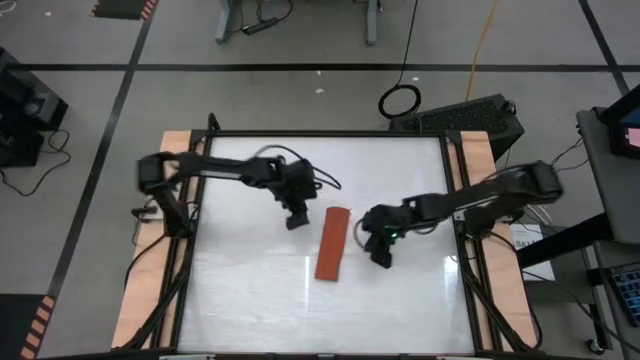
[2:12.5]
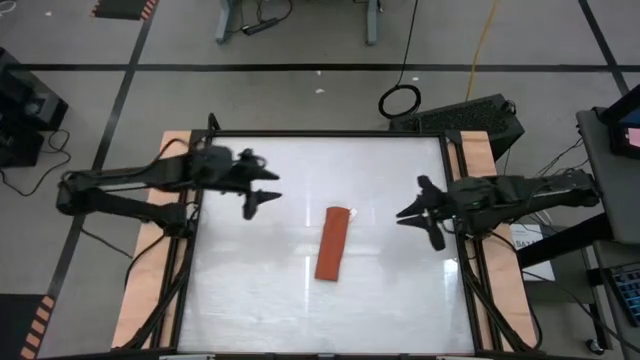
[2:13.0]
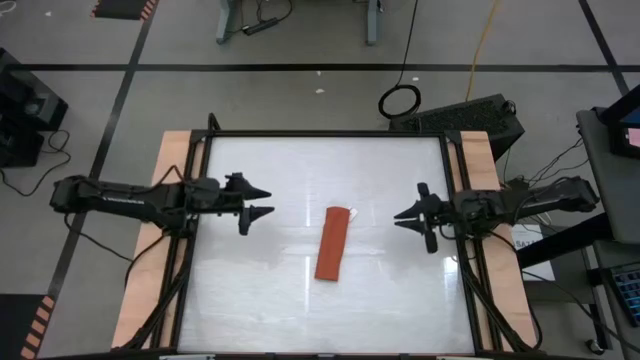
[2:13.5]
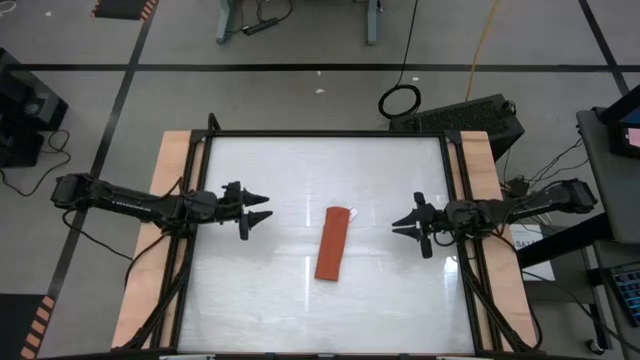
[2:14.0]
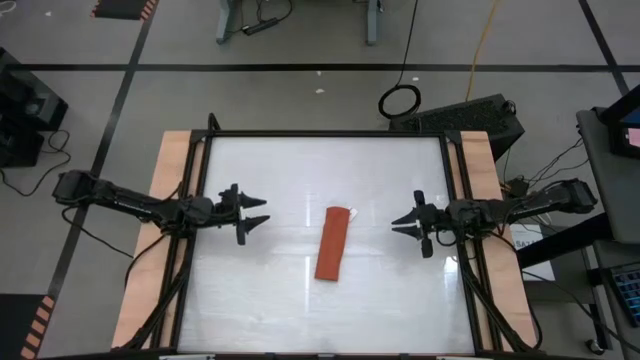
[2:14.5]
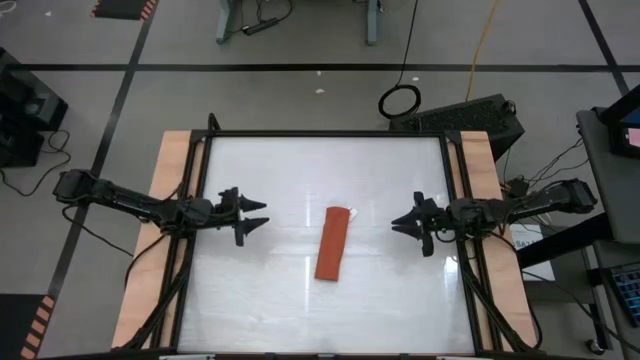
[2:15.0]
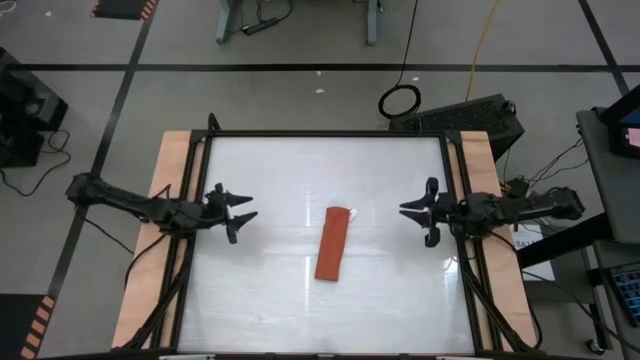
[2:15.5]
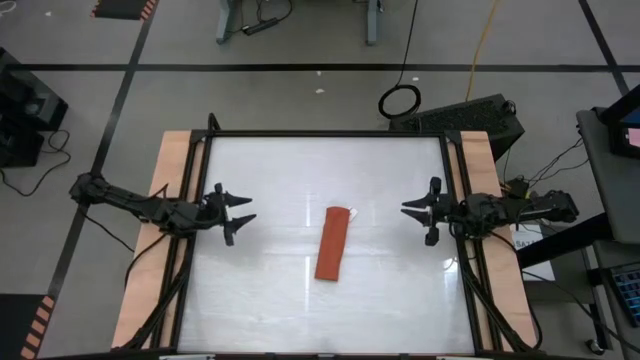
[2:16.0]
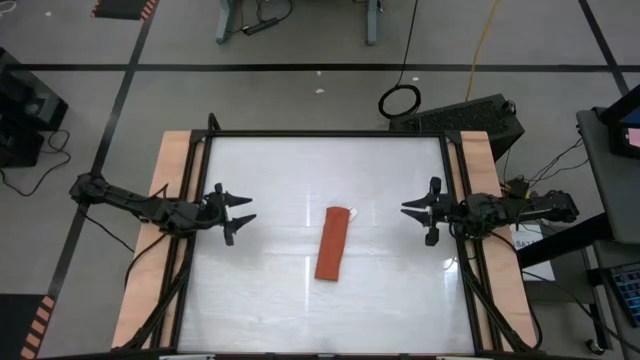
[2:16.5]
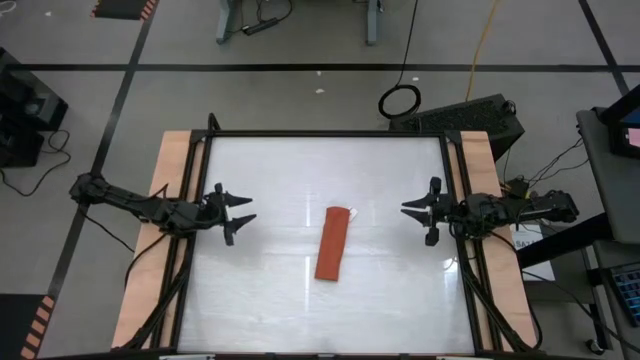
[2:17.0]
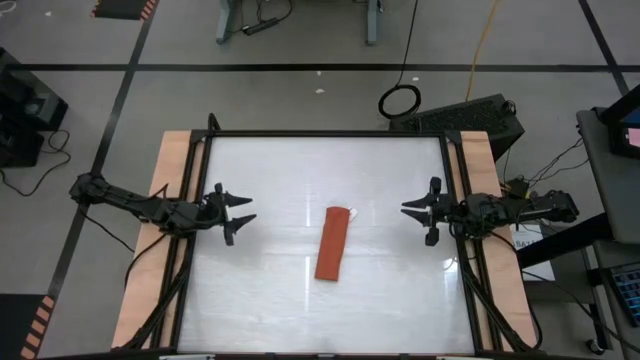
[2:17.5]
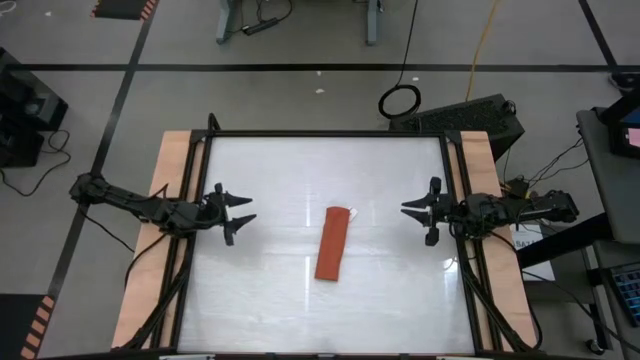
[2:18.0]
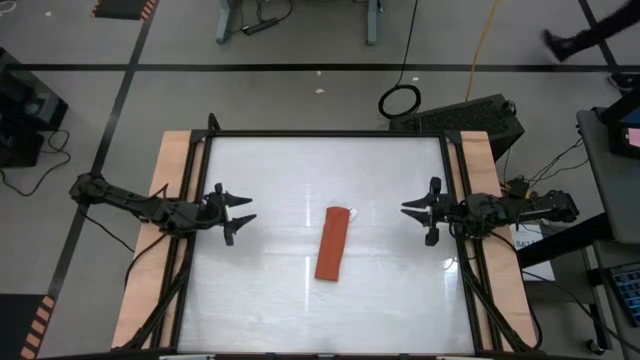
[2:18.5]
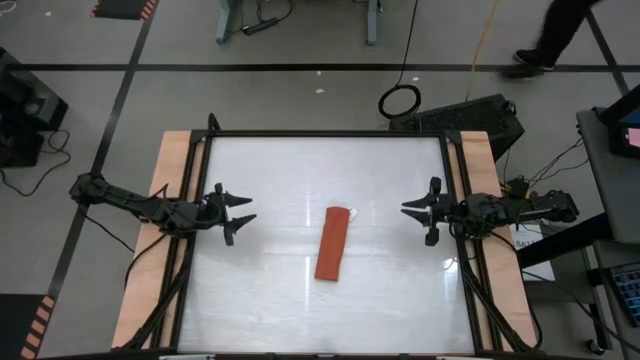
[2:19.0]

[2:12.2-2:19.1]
Task: Roll towel
Return to Home Position

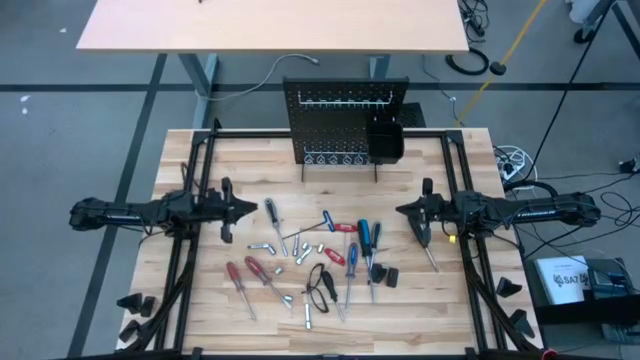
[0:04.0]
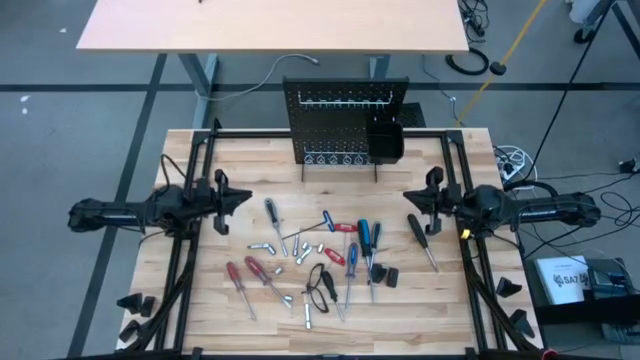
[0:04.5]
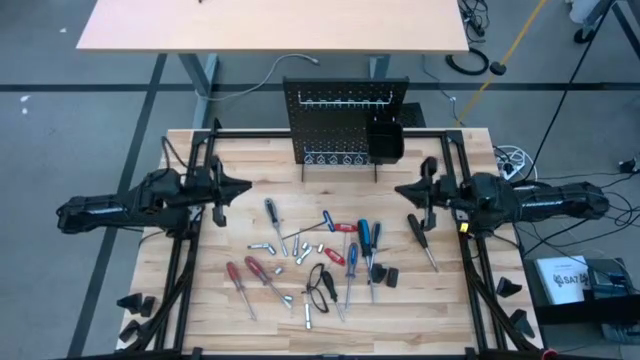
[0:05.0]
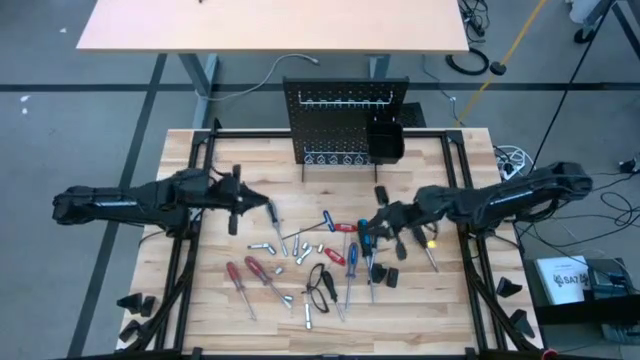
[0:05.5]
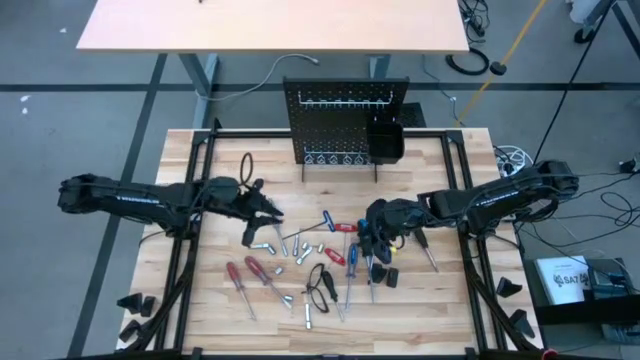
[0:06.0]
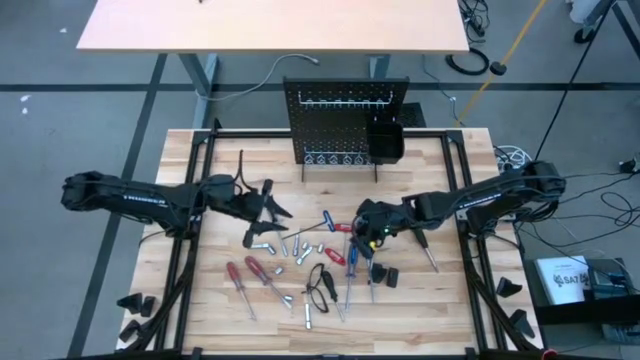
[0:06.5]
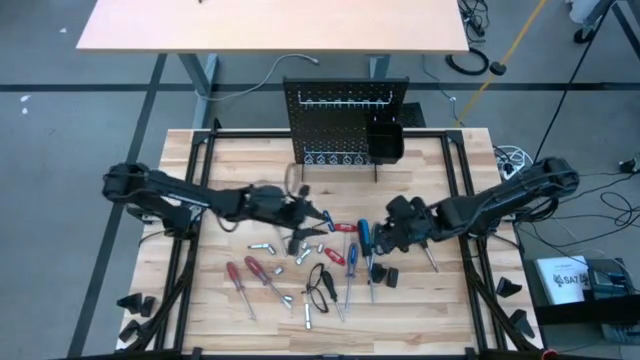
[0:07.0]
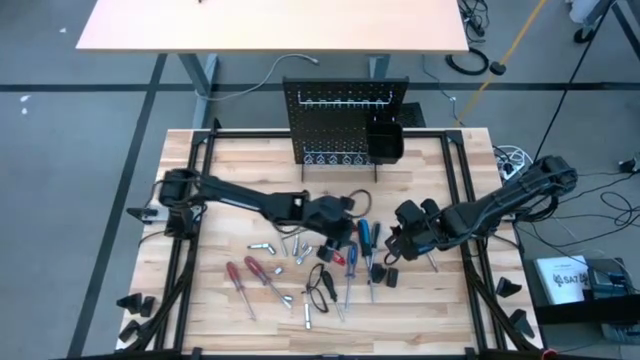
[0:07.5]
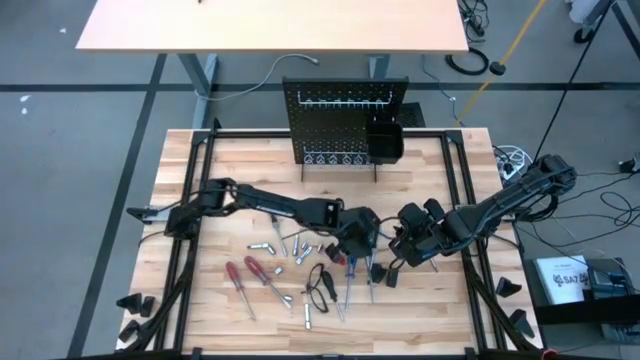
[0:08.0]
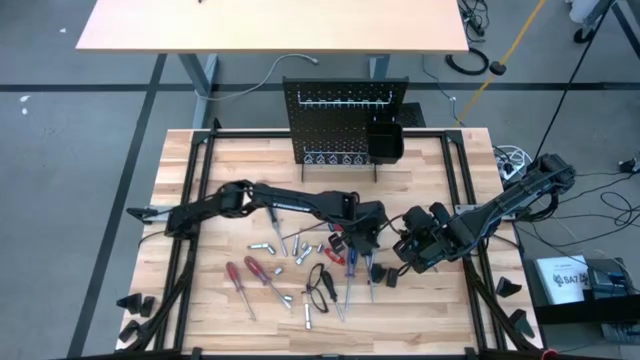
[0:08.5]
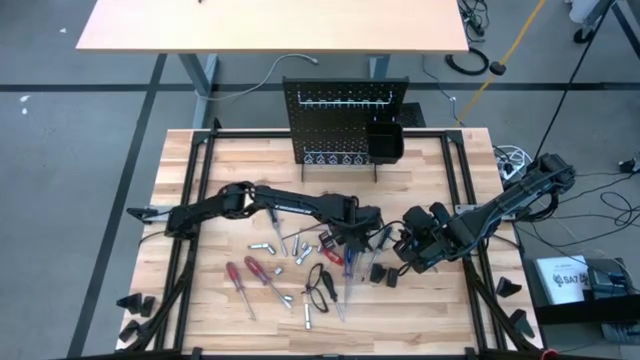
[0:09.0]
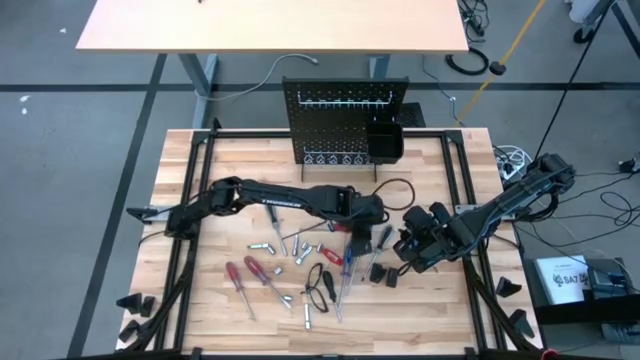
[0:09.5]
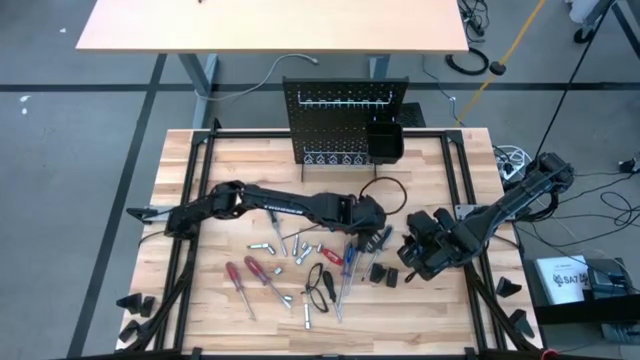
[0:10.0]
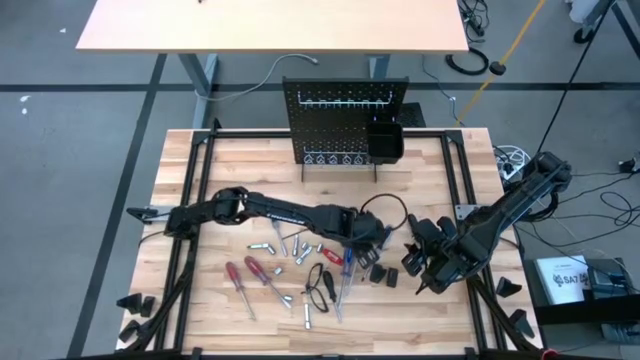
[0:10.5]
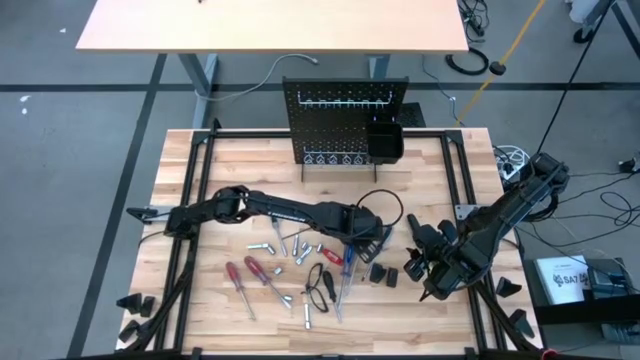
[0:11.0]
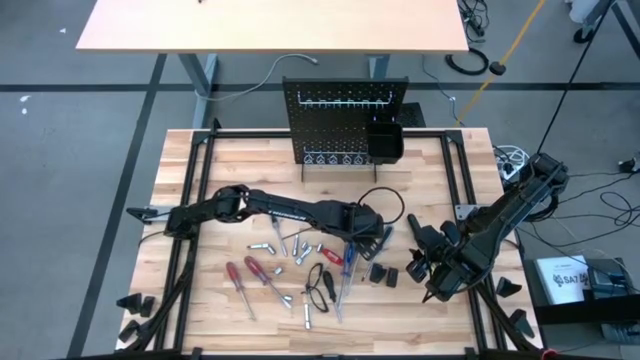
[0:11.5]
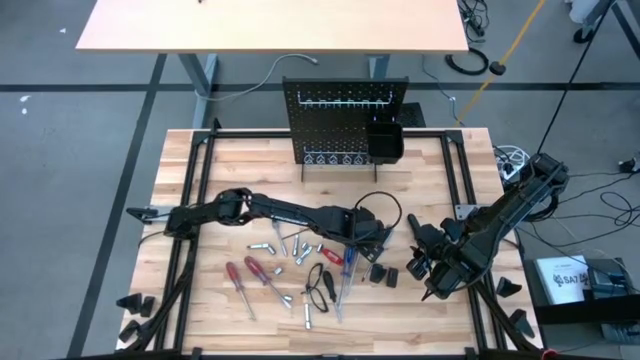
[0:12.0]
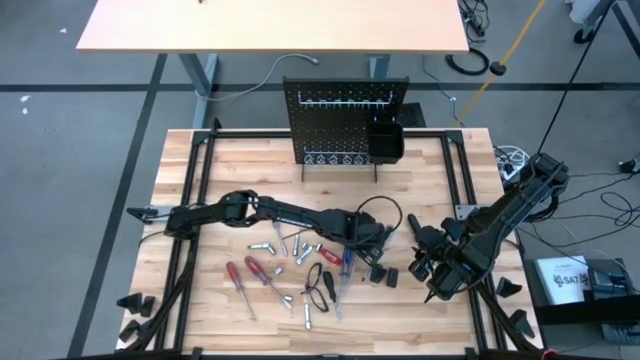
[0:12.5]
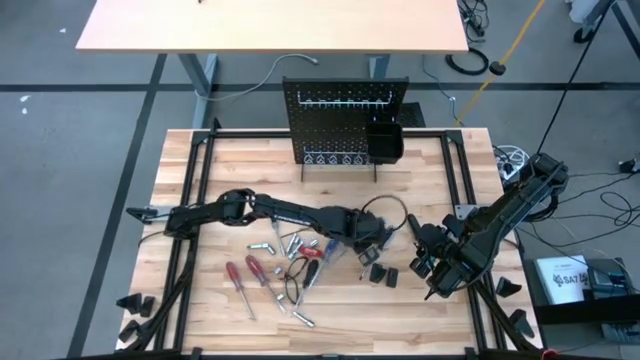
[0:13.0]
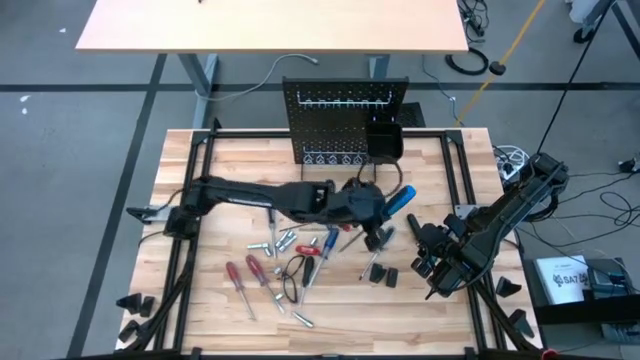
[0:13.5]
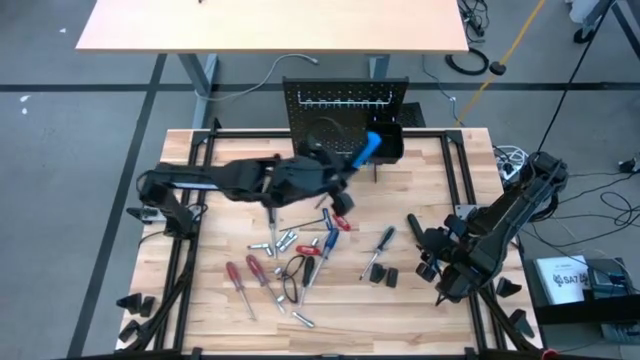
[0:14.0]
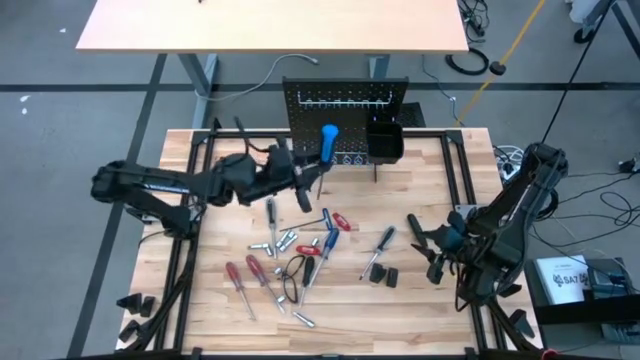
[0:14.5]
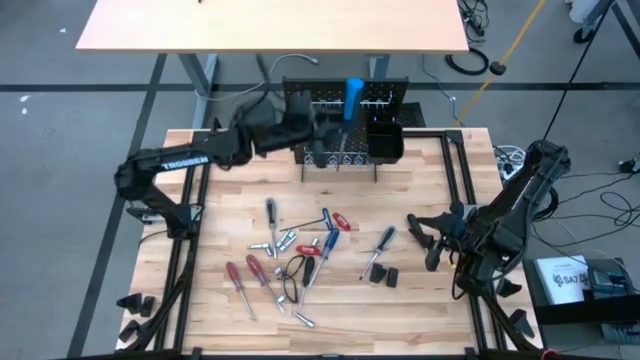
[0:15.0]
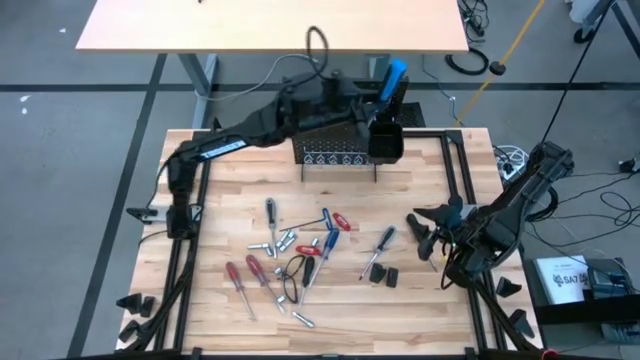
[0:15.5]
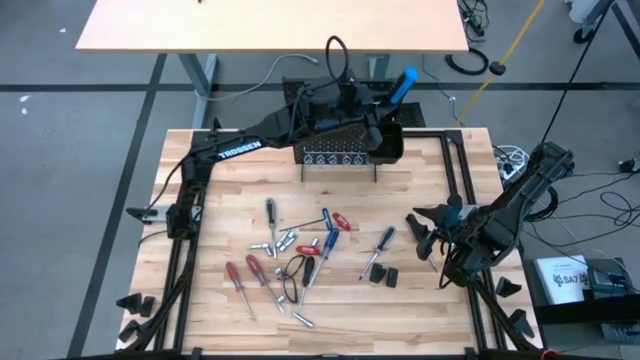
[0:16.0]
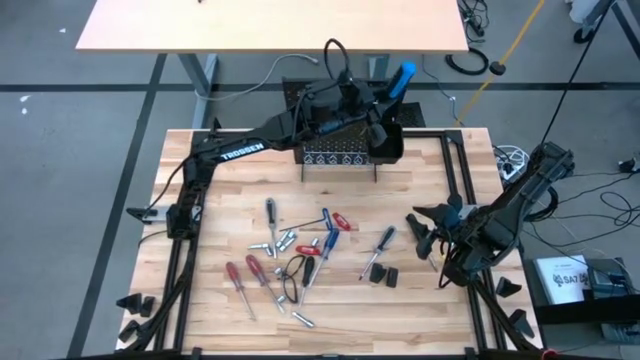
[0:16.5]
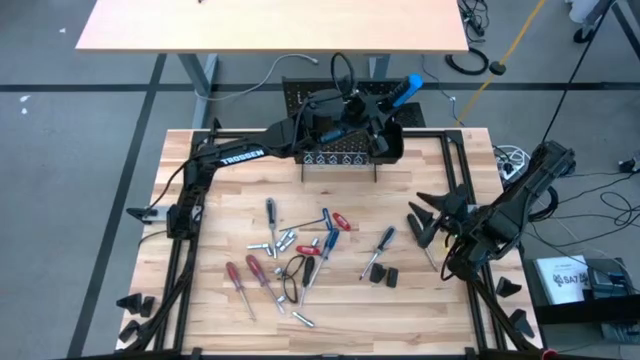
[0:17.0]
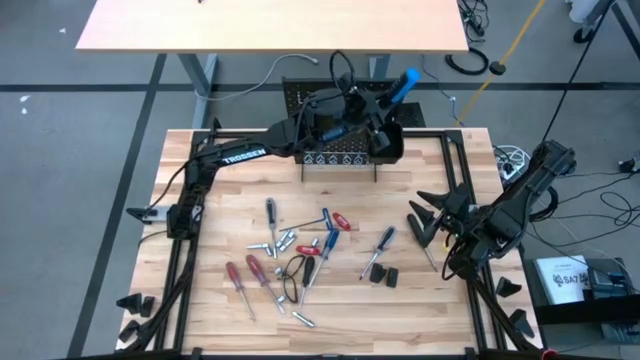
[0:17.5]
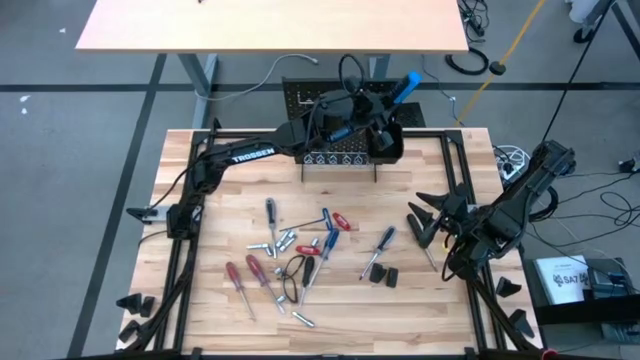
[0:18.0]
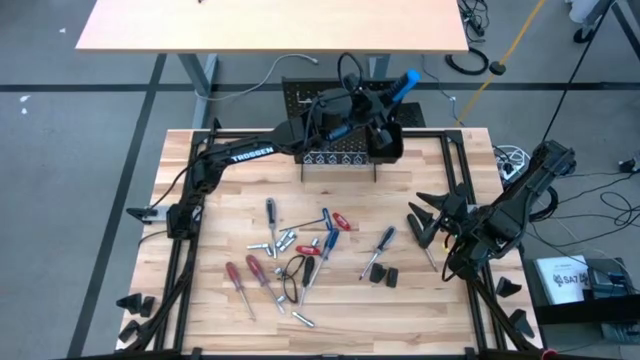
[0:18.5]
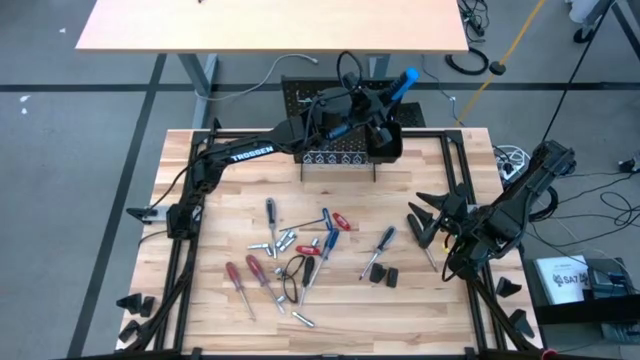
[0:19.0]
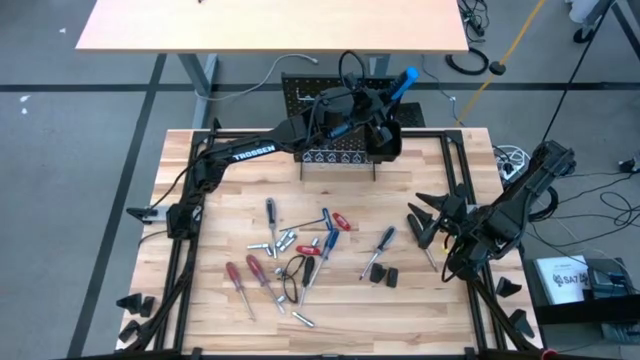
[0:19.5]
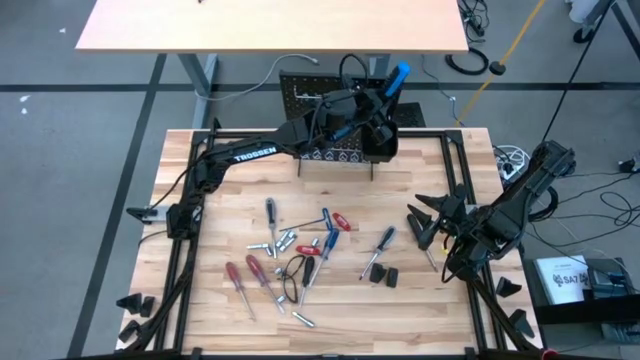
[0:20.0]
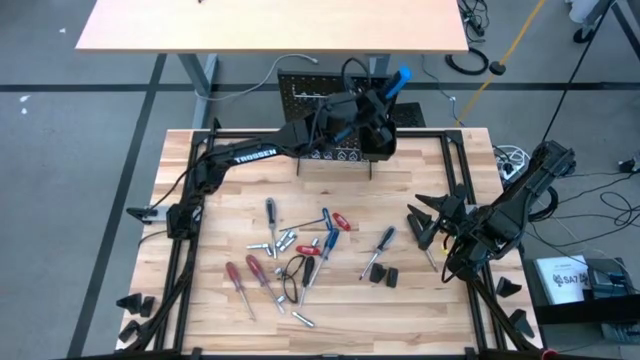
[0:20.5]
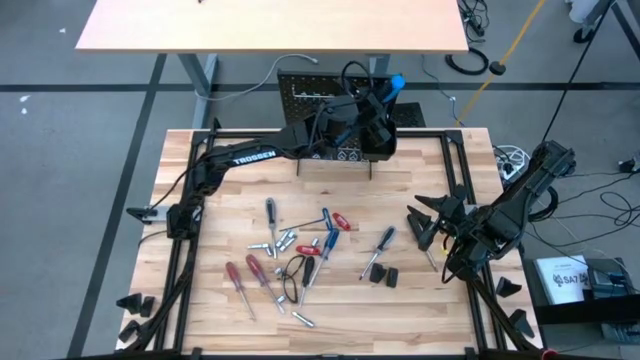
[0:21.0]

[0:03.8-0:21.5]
Task: Hang tools onto peg board
Hang the blue flat screwdriver onto the peg board
